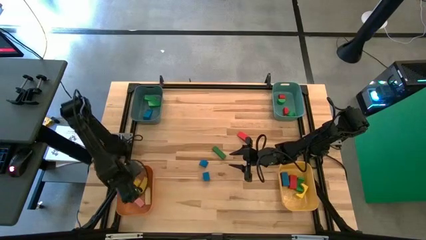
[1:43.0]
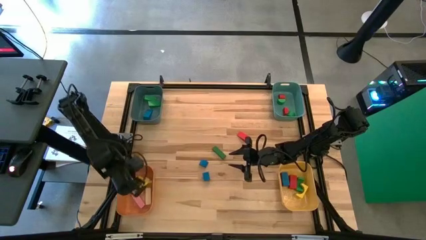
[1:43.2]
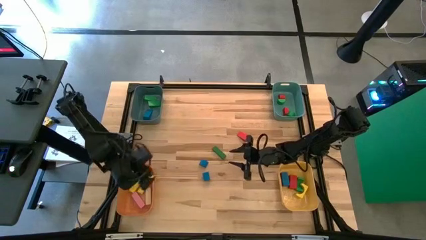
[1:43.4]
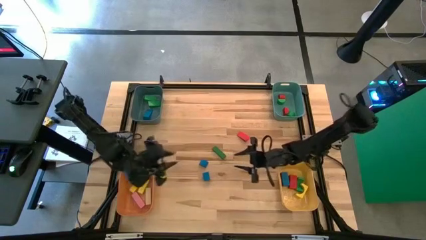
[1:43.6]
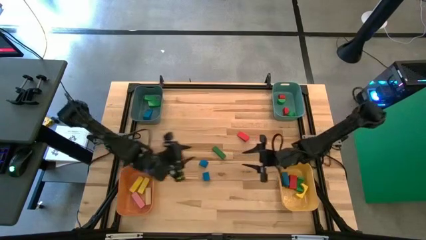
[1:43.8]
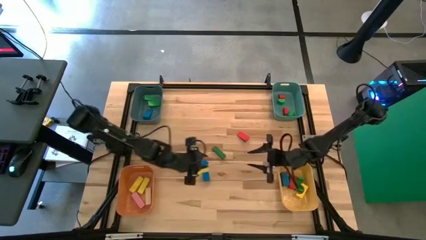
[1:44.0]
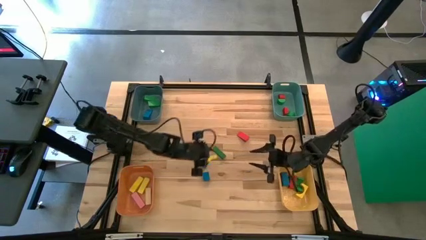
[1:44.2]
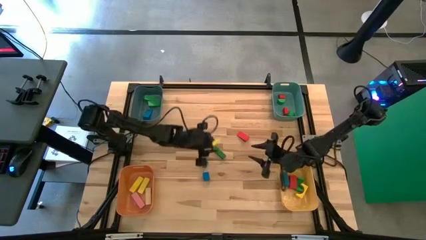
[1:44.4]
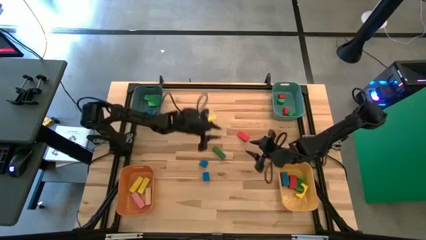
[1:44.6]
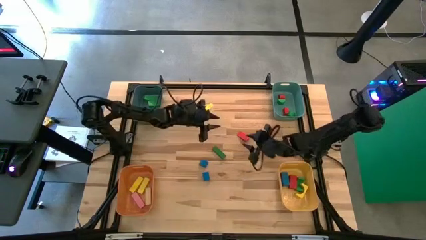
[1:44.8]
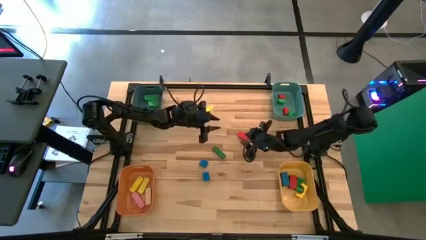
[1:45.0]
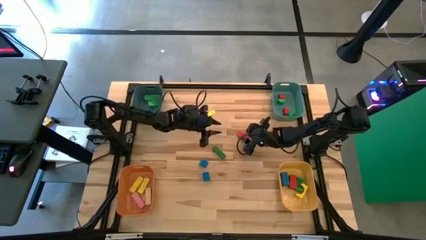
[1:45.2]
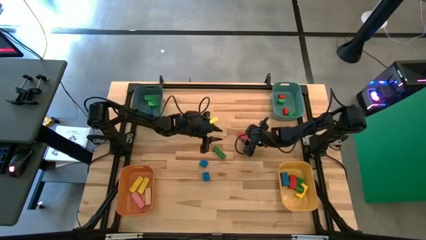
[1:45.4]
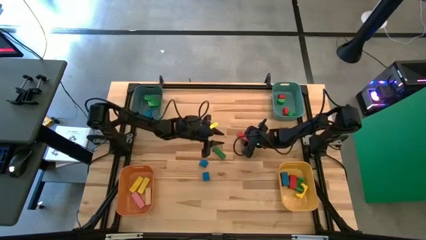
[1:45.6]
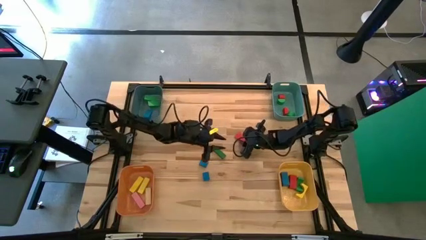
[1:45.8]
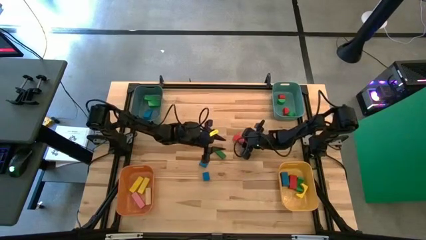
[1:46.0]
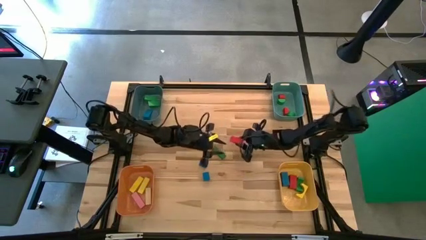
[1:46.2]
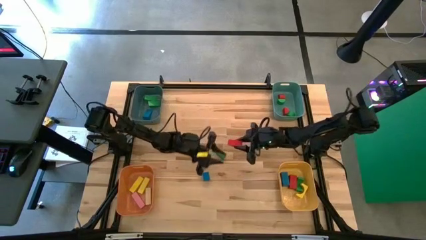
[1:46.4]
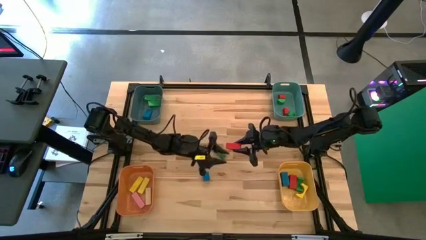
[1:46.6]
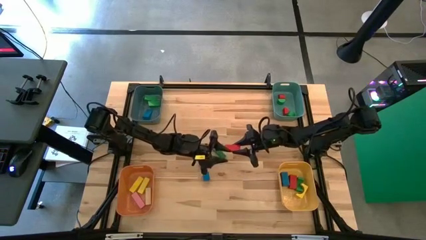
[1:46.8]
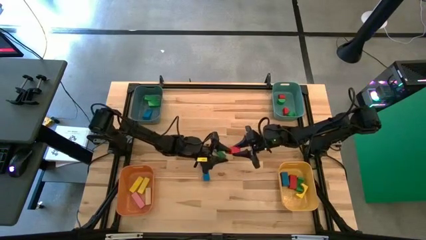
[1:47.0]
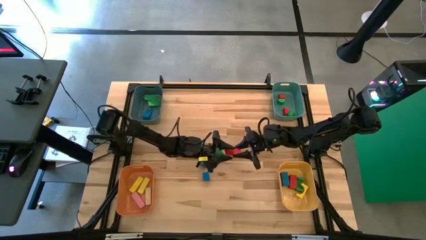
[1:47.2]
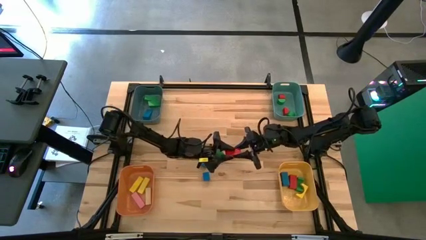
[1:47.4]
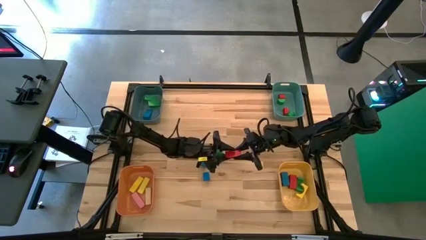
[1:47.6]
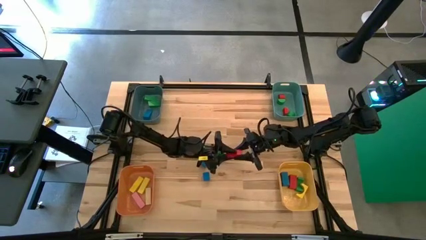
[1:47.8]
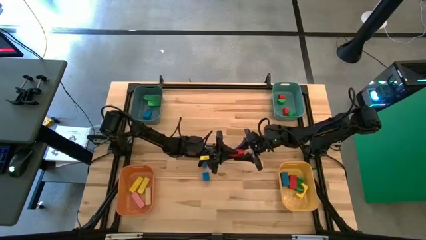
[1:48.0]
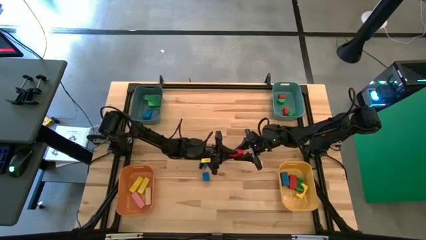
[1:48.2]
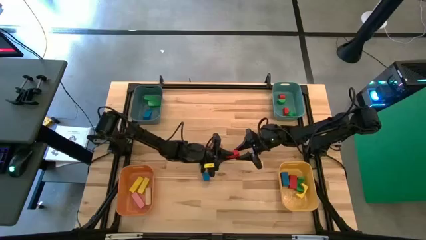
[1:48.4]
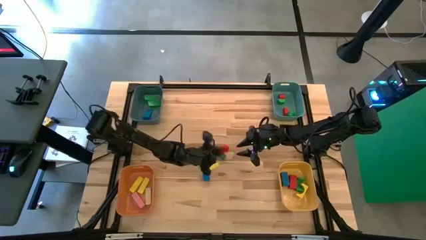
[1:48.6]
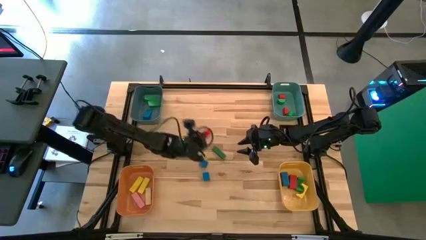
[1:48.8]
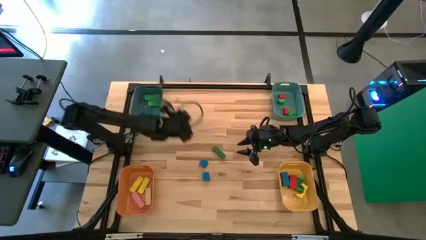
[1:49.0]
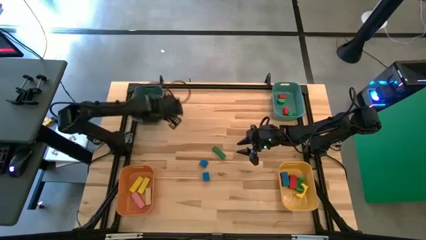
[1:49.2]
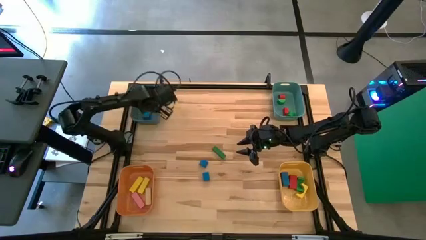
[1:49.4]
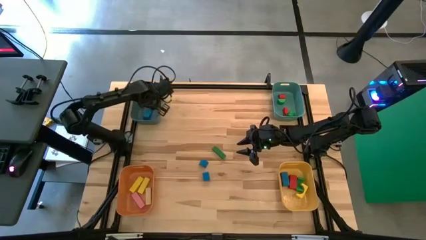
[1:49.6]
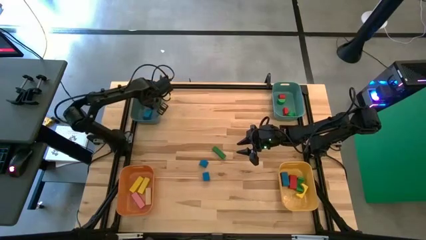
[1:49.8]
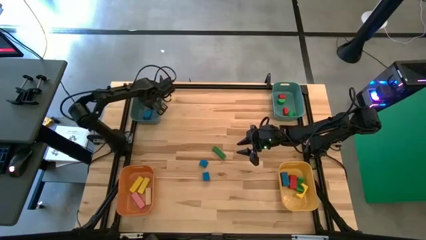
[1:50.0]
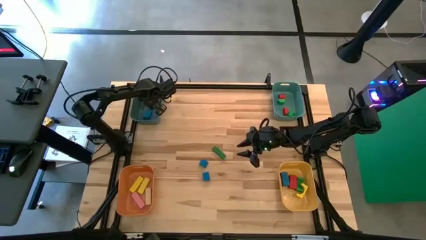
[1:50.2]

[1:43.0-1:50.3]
Task: Sort blocks by size
Put the red triangular block into the blue bin

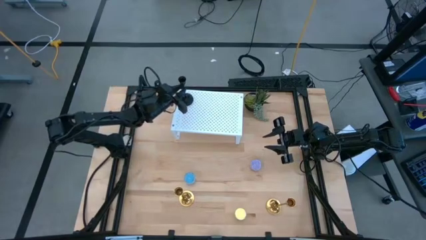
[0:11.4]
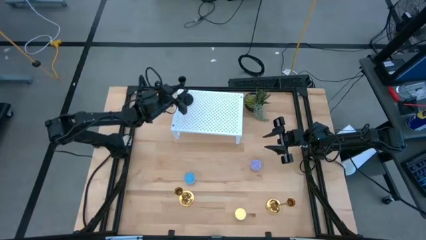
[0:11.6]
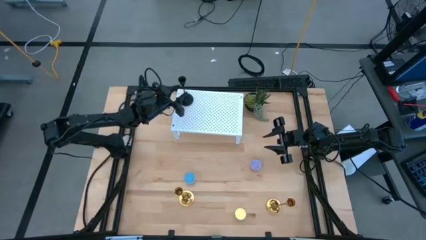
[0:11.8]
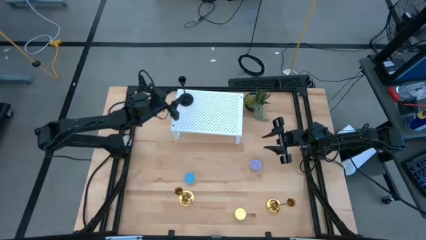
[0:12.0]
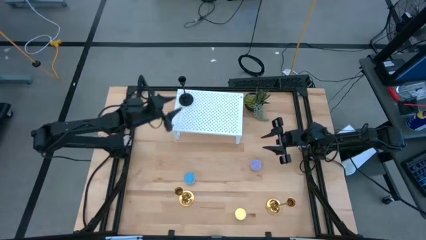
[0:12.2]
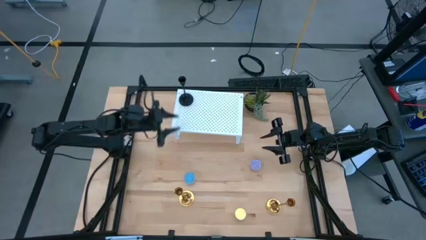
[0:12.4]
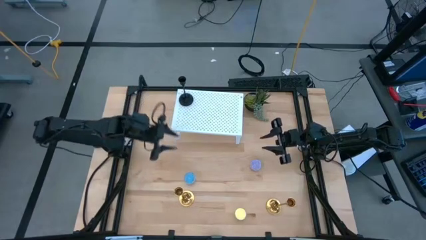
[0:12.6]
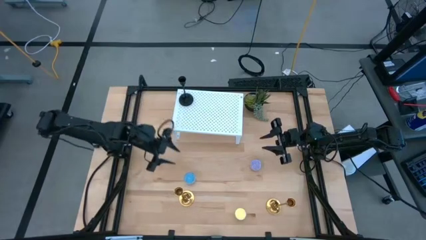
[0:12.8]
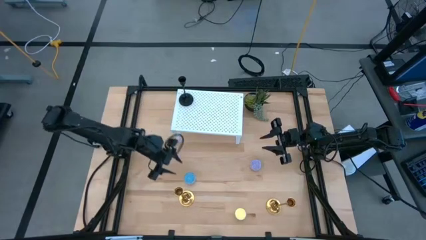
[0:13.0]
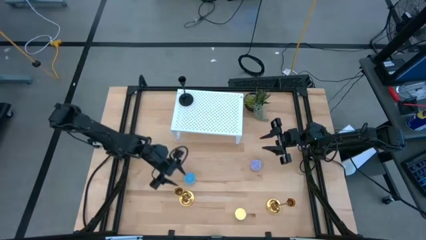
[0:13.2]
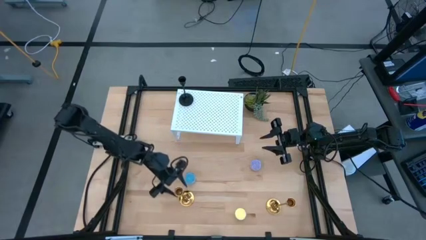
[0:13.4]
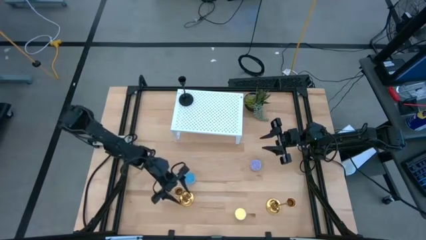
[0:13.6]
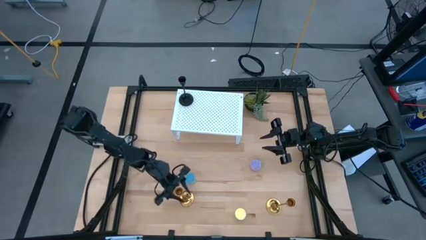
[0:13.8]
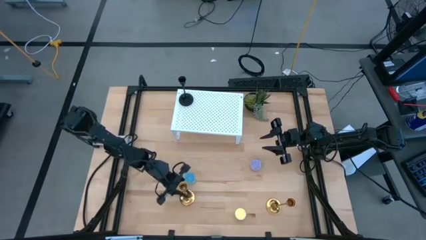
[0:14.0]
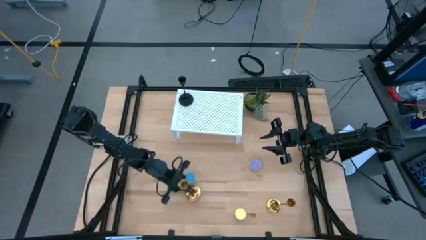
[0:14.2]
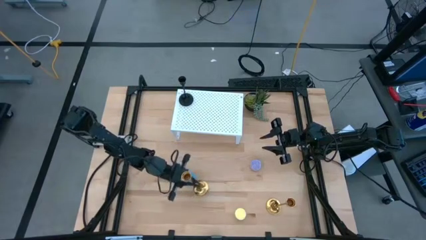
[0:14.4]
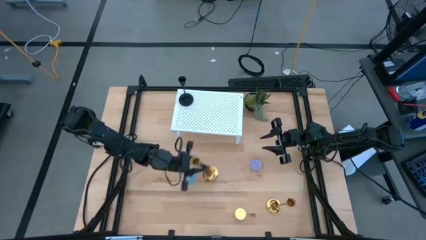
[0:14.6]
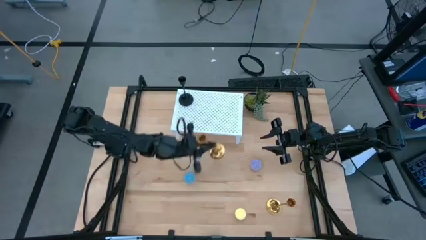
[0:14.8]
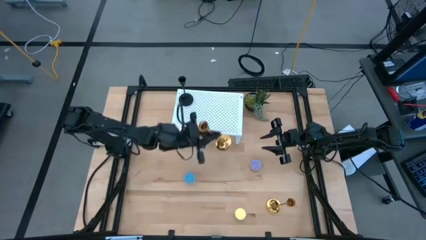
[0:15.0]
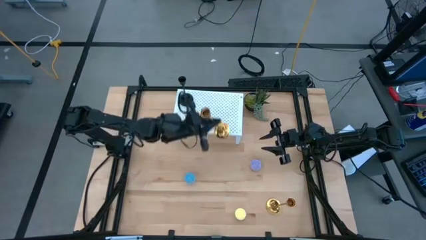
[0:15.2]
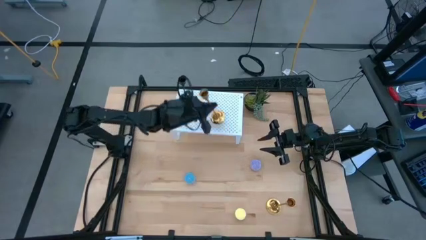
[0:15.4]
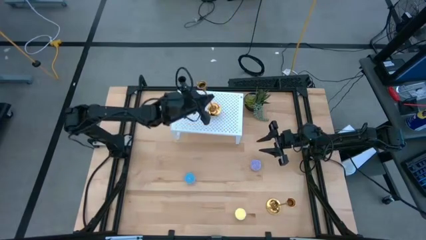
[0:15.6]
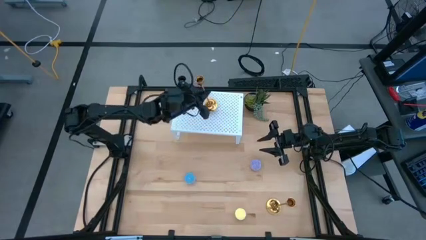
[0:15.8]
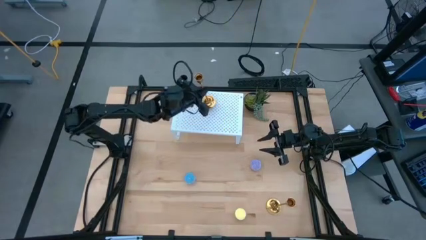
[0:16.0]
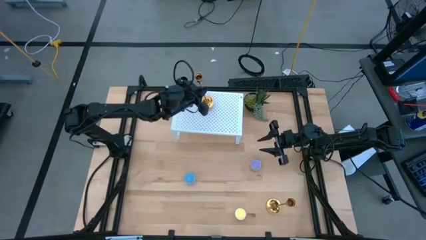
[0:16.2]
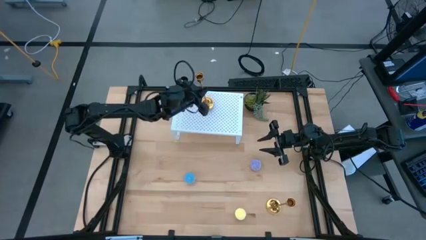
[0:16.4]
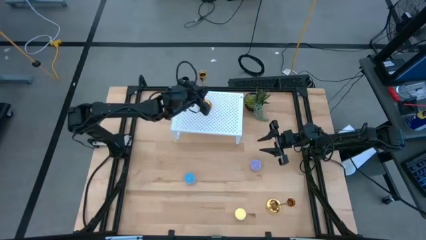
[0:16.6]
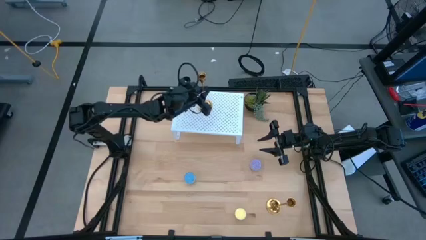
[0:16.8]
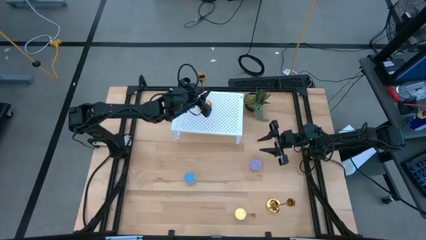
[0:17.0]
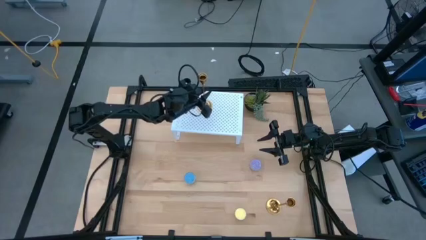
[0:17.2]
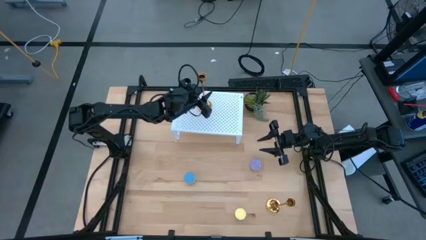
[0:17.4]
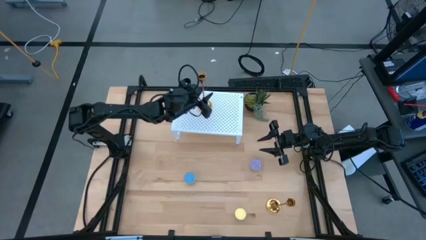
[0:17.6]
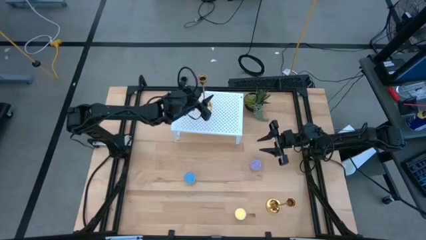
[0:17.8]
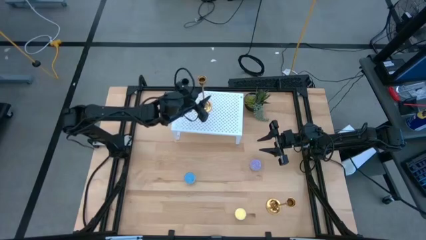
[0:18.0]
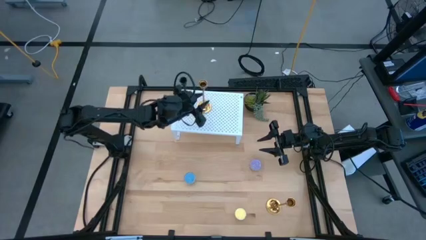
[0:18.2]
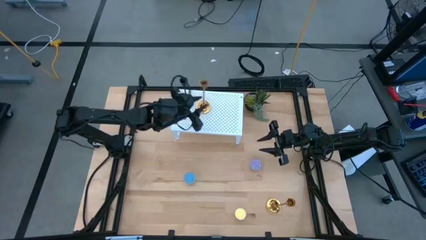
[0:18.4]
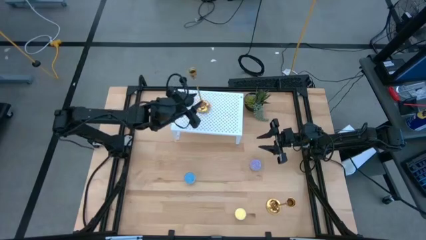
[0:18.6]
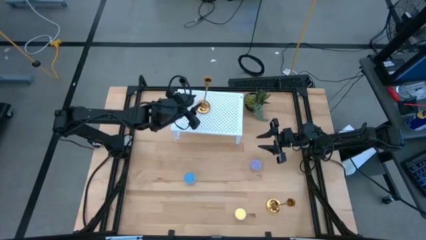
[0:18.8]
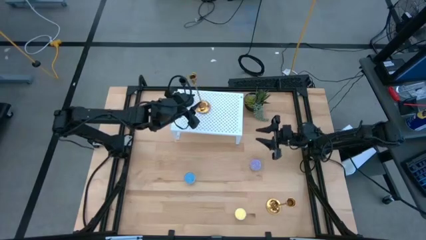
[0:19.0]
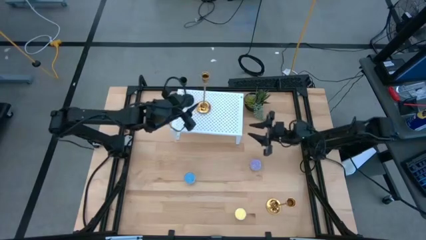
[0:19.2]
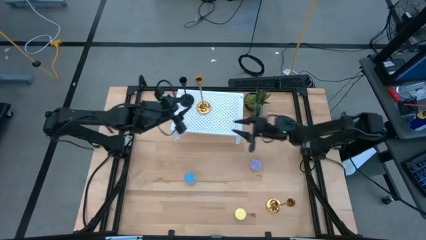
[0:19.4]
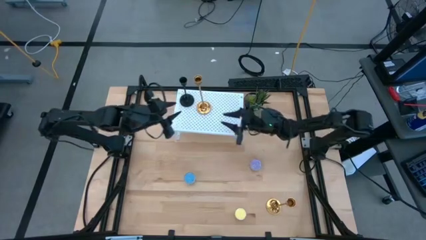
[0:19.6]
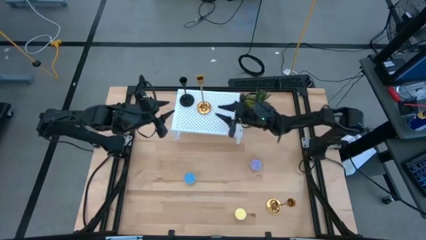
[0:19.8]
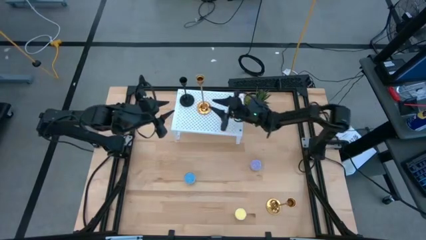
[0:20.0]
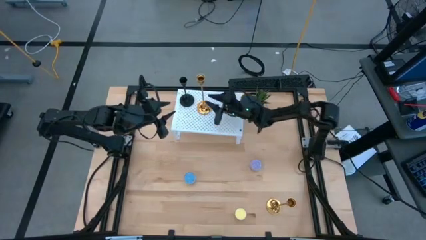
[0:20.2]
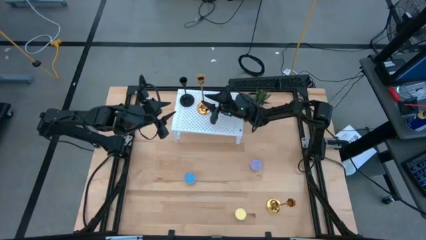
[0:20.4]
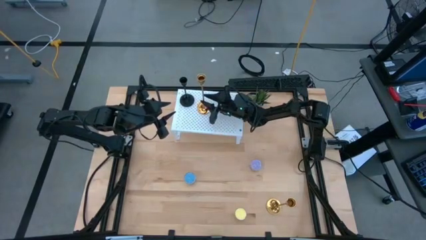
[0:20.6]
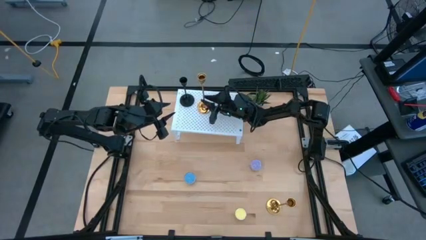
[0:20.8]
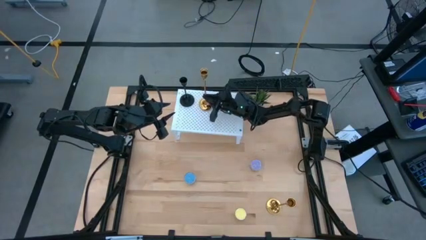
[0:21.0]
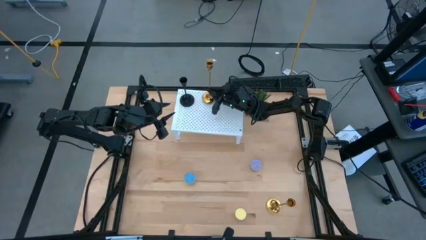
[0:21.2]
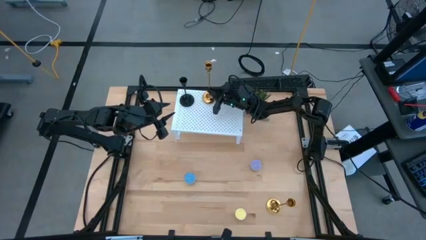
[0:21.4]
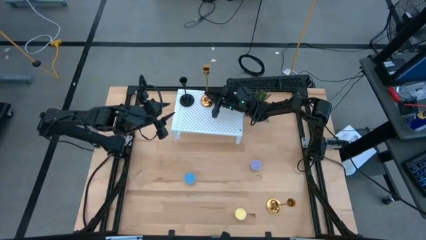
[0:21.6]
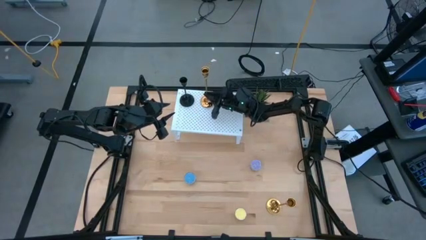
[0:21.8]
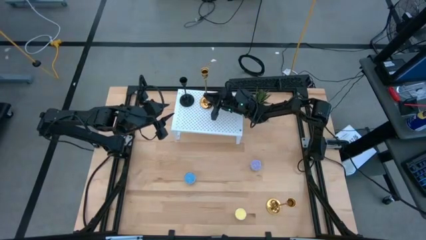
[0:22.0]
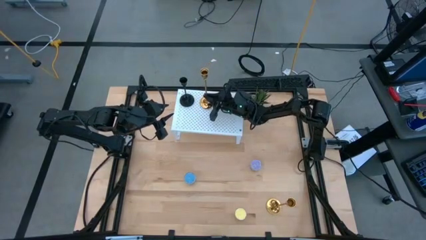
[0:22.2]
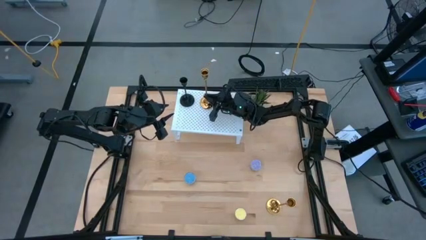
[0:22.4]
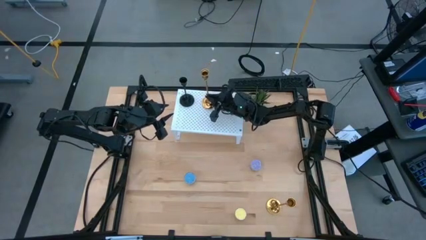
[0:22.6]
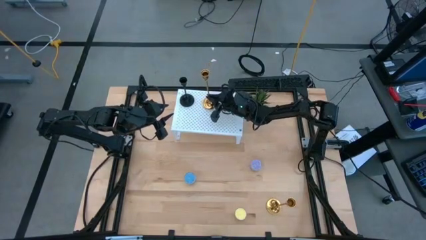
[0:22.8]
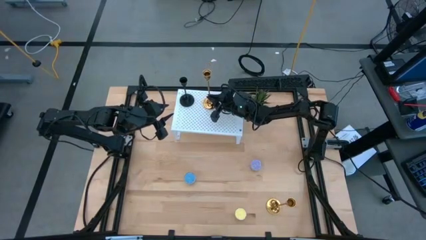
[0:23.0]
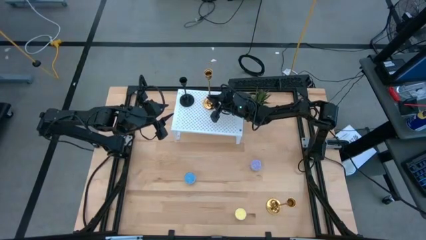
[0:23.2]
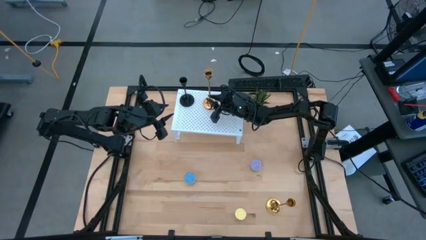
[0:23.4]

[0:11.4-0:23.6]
Task: Pick & Place candle stick holders
Put the left gold candle holder on the shelf
